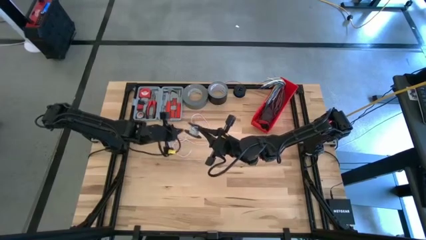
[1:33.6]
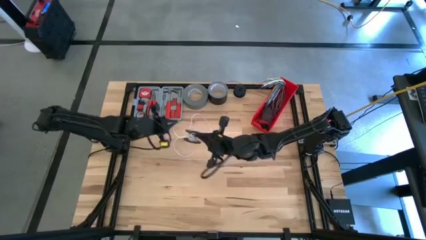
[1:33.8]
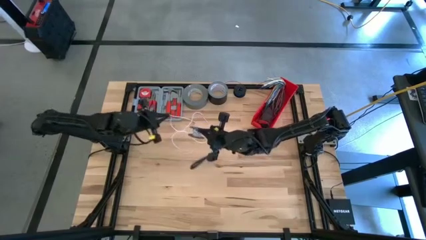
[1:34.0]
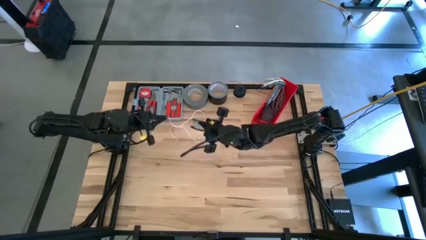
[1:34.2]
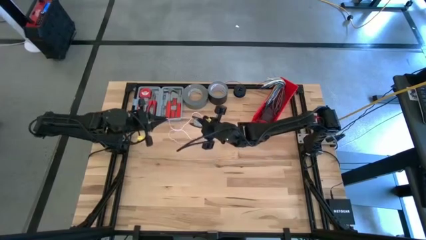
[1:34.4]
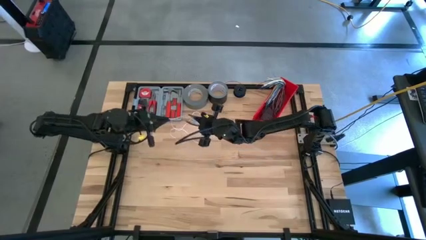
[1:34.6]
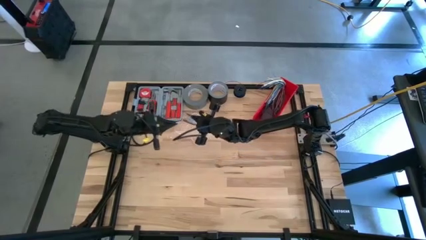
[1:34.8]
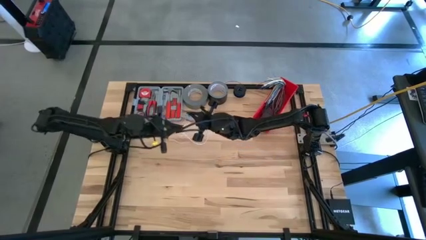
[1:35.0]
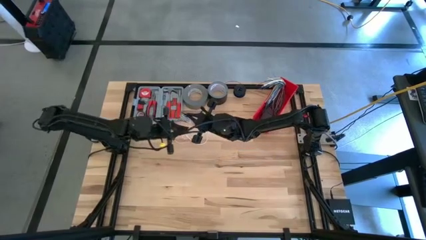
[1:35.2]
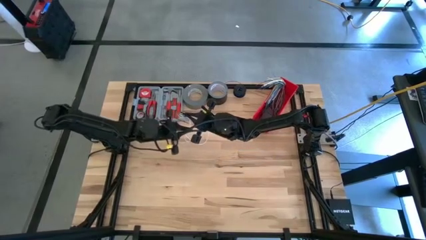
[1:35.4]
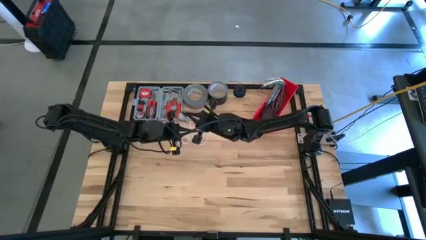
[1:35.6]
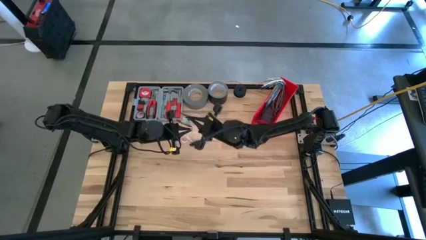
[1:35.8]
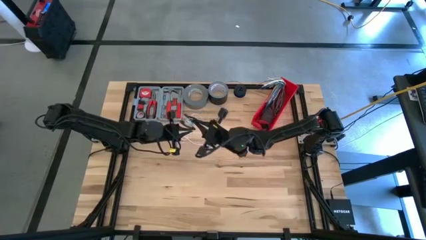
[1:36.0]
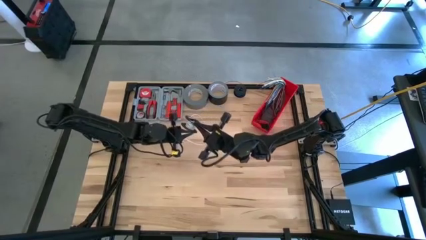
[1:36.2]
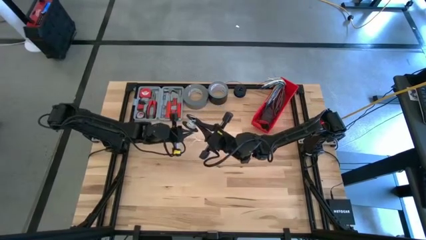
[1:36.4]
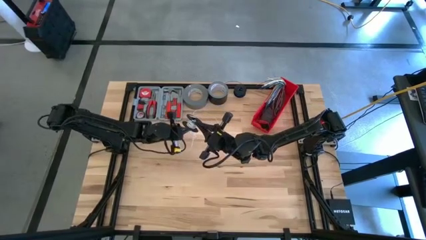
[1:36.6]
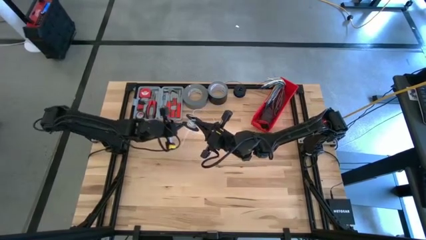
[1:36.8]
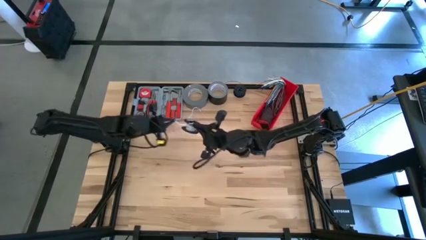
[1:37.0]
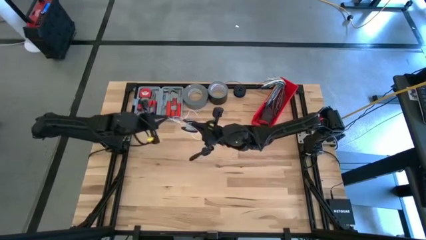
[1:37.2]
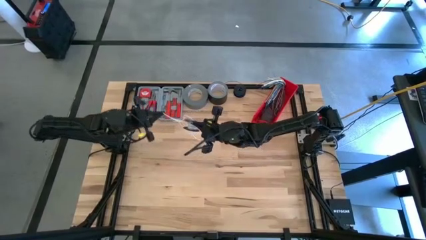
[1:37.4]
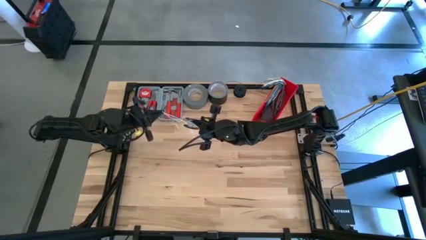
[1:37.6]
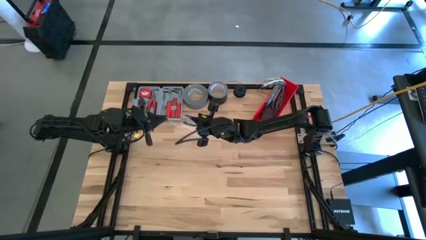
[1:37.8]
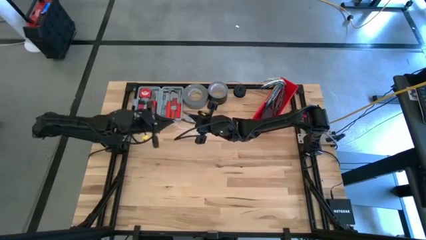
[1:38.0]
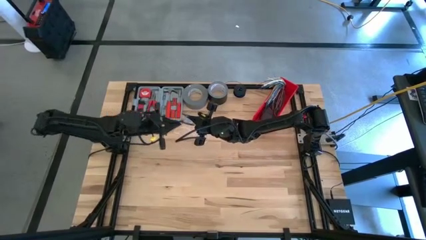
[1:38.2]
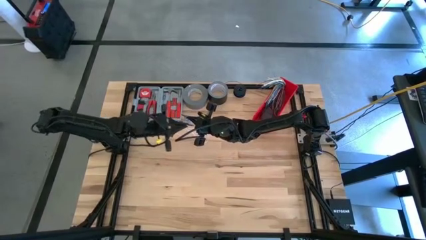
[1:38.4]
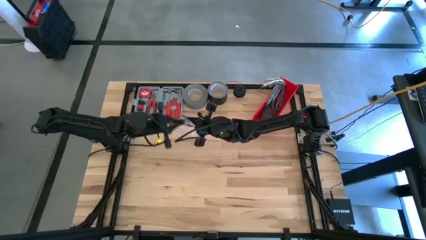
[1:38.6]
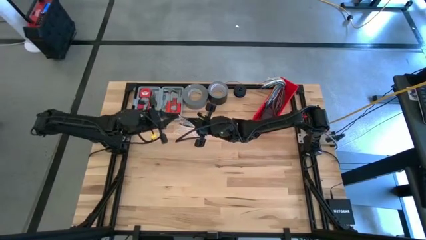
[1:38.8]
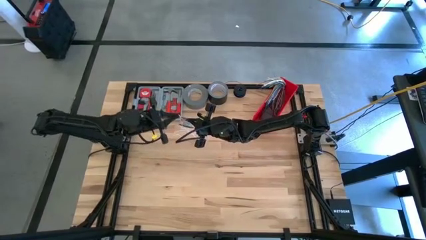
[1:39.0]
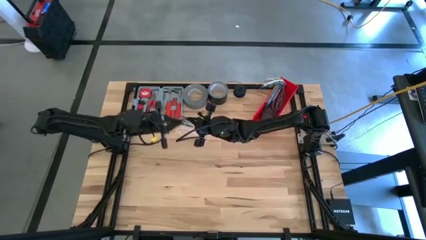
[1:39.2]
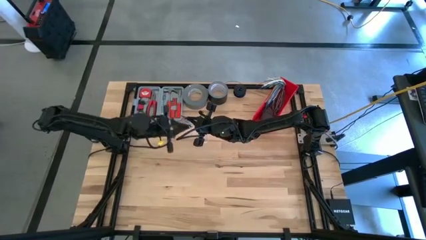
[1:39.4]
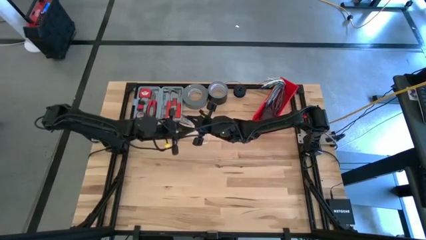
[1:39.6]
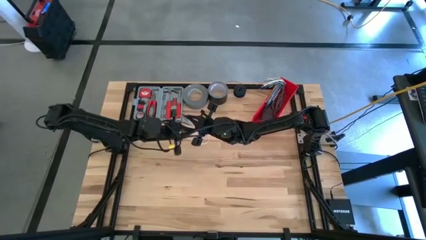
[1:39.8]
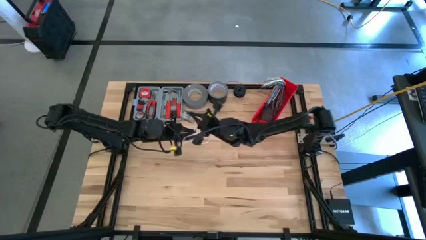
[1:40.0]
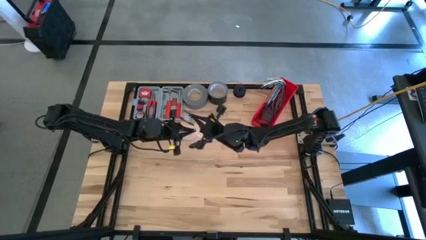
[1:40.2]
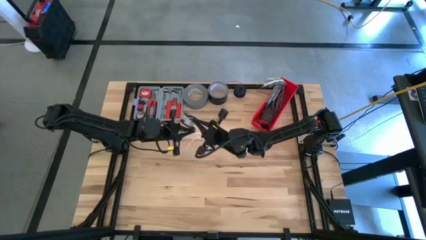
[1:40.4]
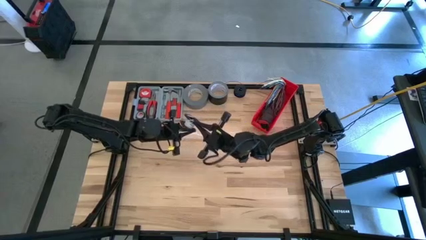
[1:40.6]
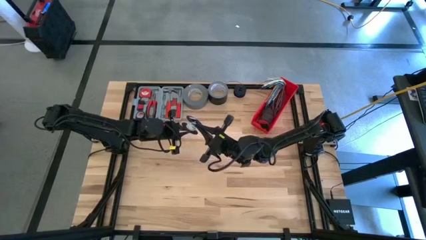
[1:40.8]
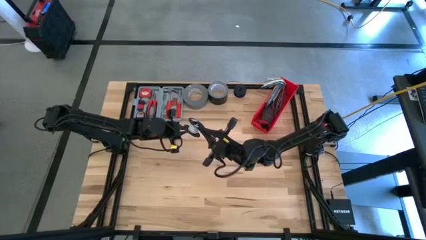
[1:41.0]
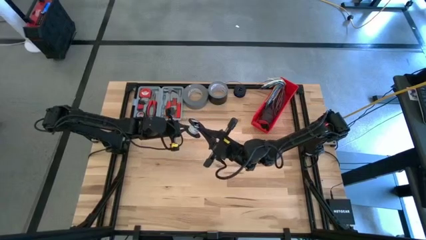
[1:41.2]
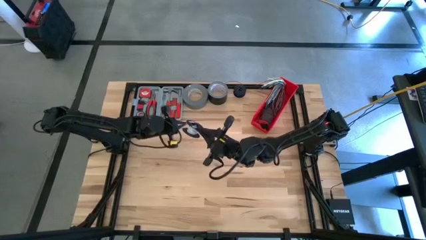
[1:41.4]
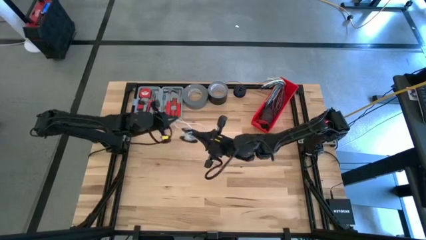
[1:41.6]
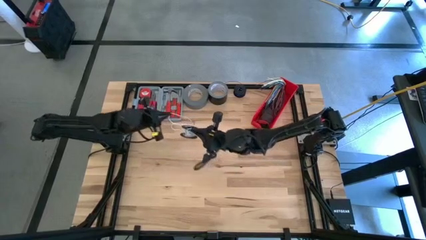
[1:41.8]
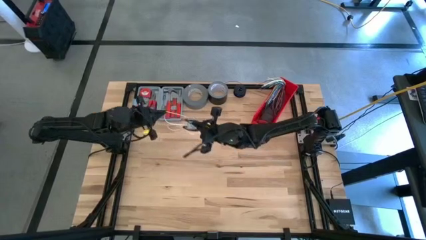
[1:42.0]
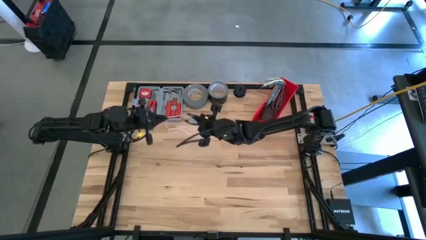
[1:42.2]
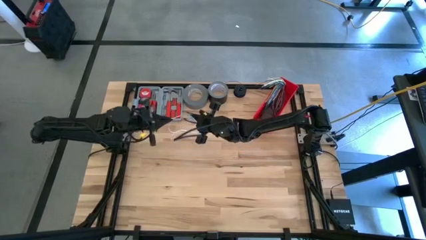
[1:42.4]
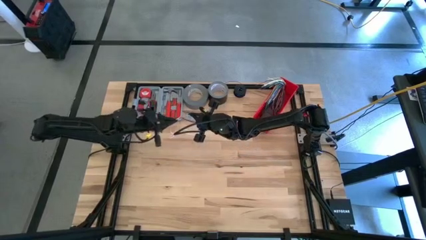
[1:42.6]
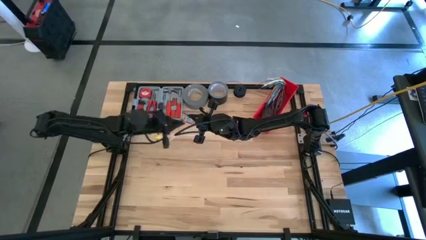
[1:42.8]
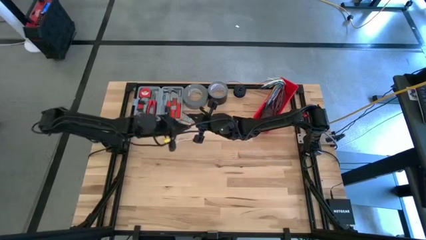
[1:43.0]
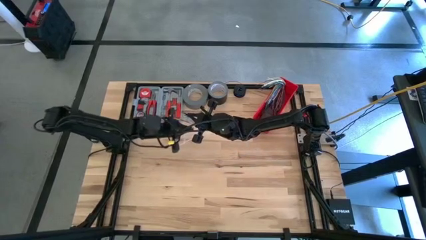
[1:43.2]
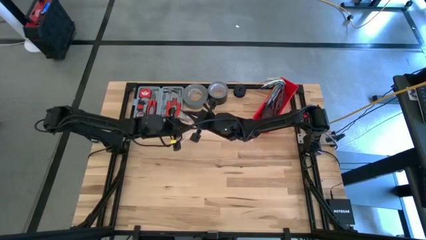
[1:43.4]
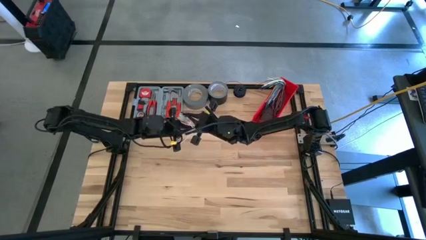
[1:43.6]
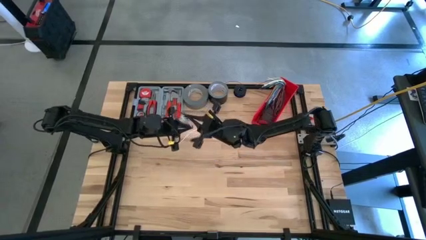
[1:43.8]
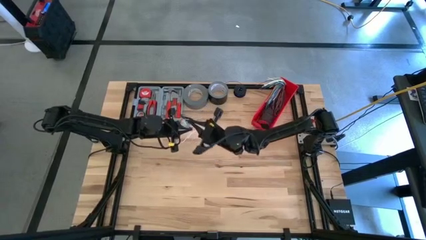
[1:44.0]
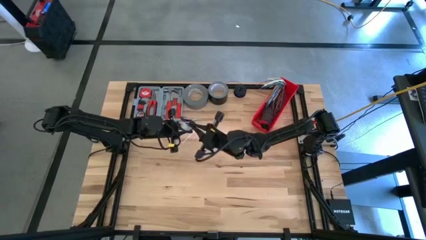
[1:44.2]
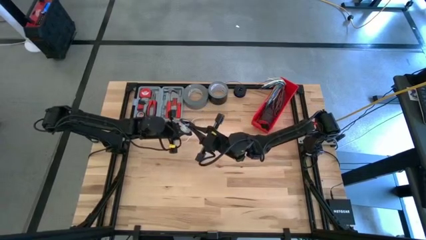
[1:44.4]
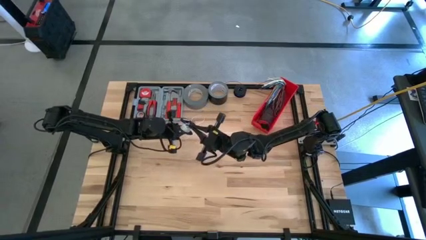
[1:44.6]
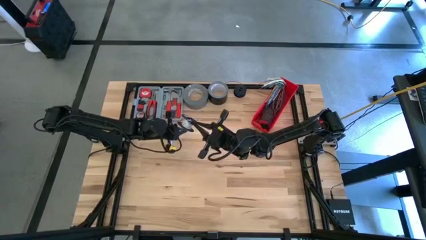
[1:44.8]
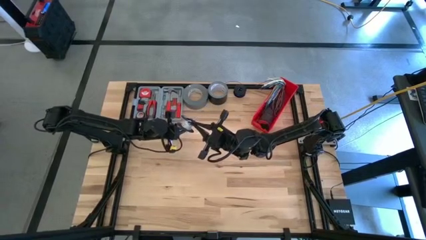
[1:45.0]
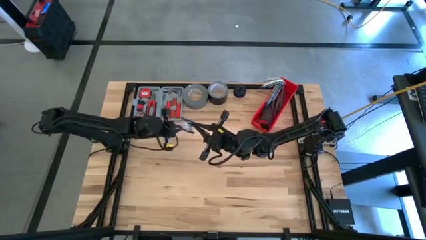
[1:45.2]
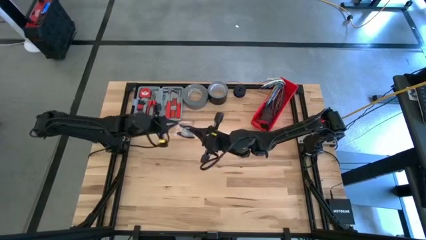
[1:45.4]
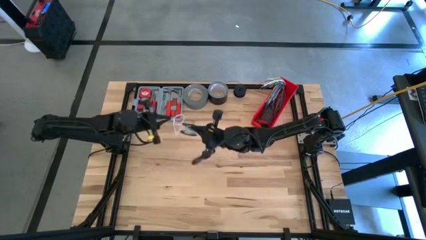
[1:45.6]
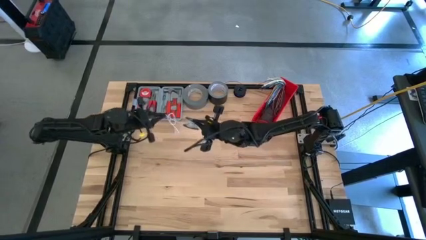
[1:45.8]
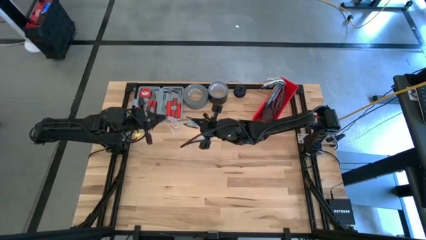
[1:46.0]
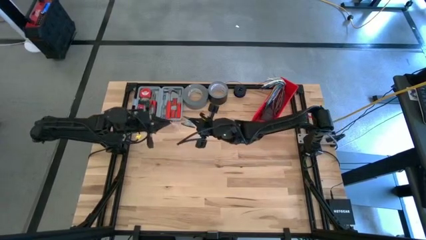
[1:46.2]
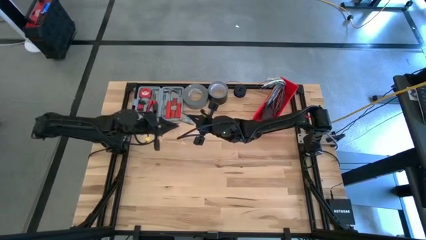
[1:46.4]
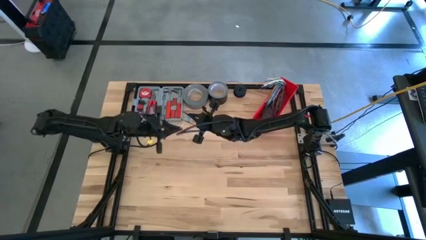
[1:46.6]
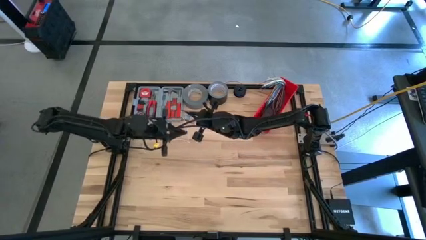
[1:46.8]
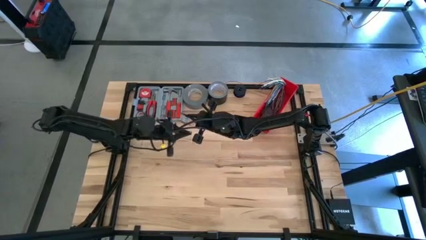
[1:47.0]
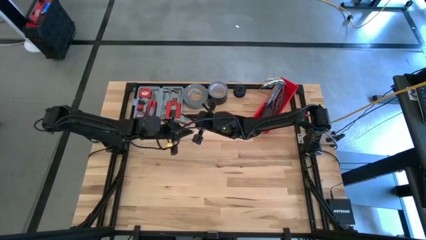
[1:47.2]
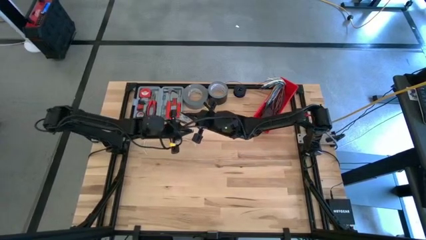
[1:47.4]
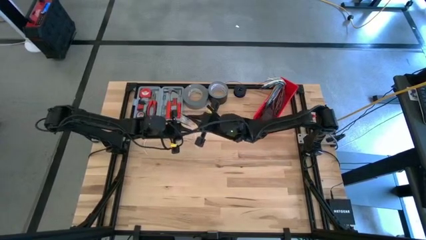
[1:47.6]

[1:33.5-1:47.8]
Task: Coil cords
Coil the white wire on the black spool
